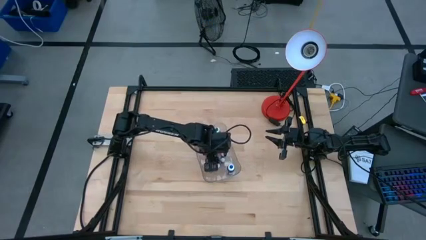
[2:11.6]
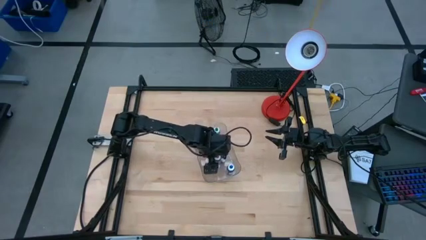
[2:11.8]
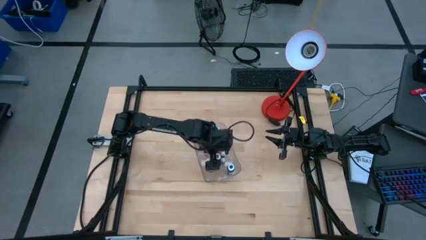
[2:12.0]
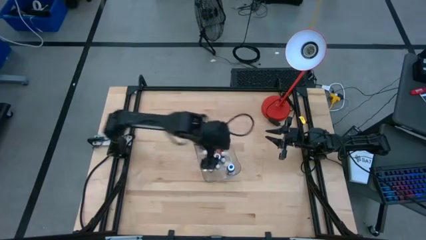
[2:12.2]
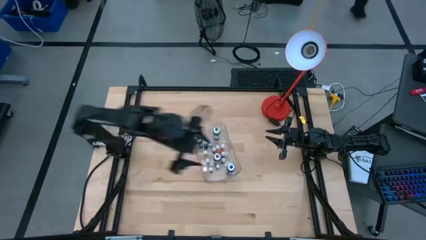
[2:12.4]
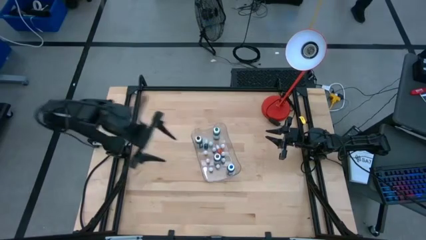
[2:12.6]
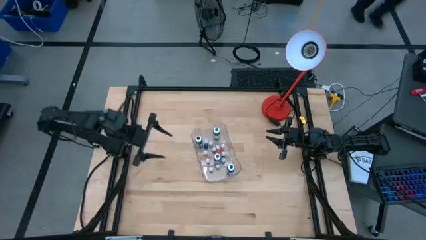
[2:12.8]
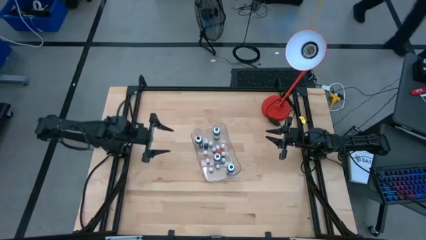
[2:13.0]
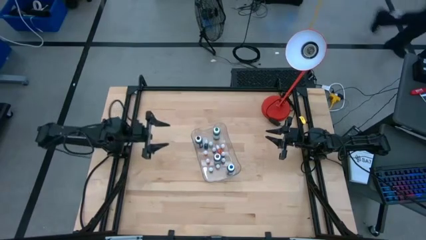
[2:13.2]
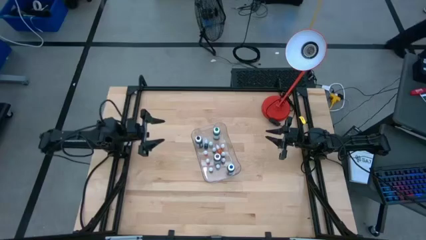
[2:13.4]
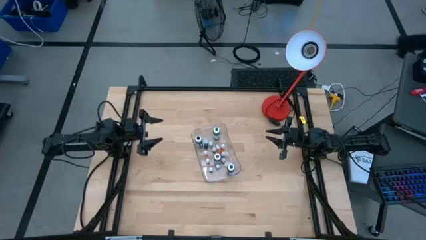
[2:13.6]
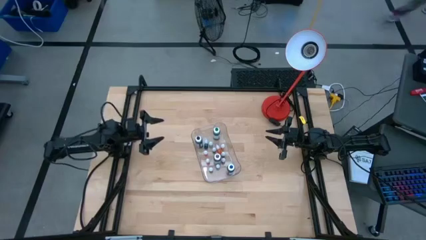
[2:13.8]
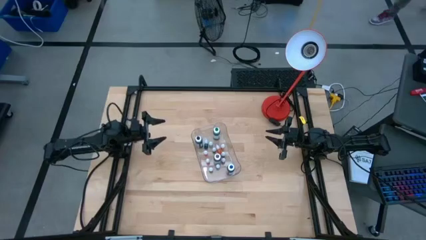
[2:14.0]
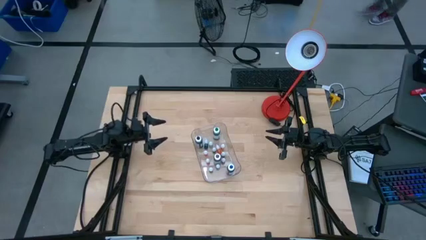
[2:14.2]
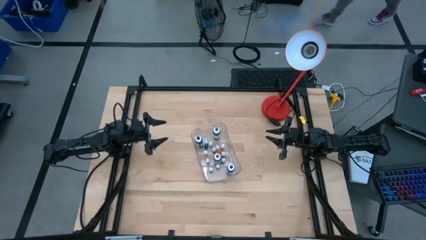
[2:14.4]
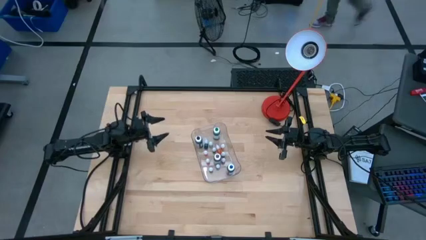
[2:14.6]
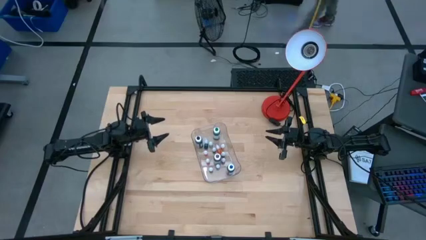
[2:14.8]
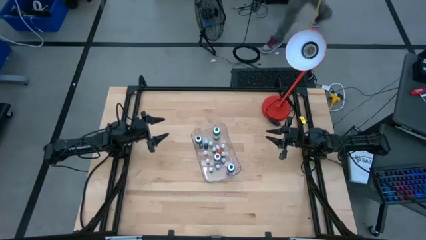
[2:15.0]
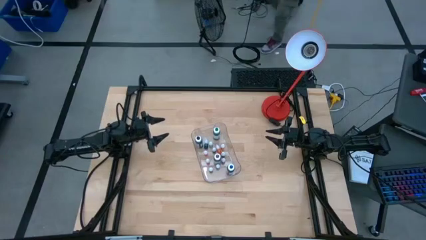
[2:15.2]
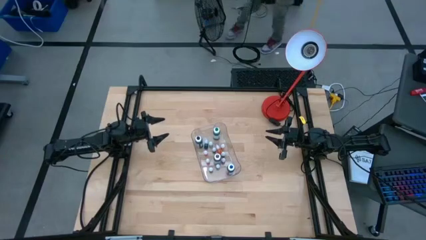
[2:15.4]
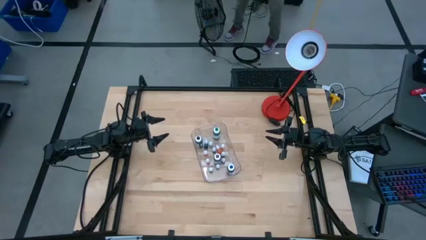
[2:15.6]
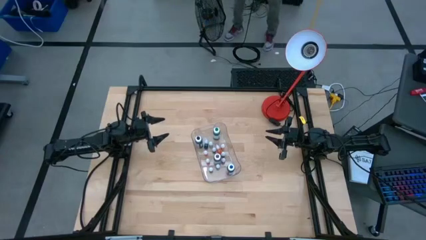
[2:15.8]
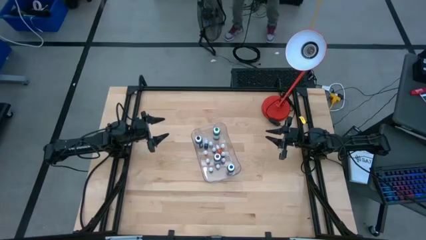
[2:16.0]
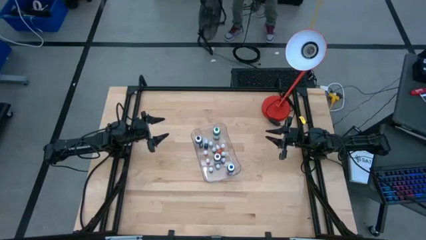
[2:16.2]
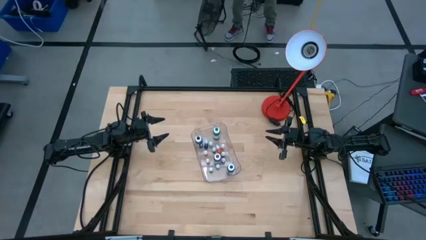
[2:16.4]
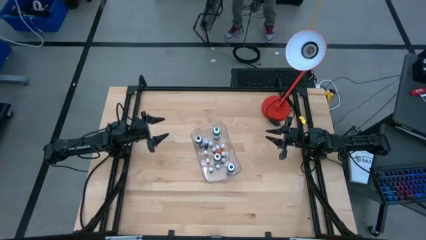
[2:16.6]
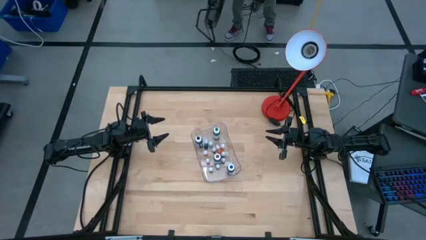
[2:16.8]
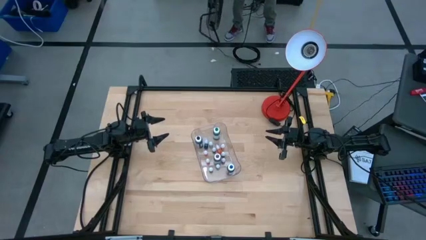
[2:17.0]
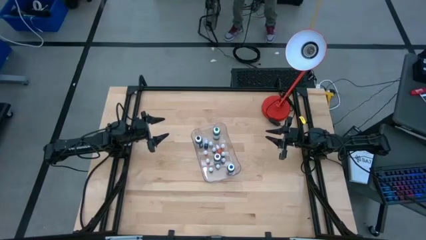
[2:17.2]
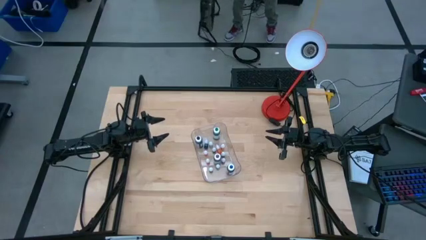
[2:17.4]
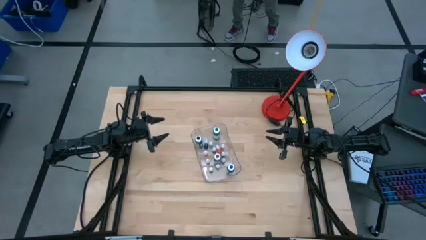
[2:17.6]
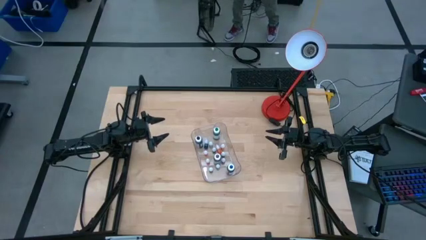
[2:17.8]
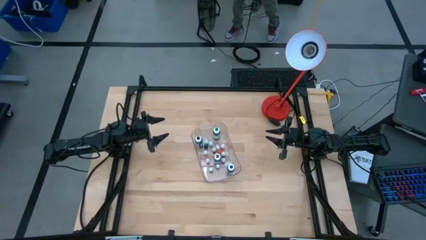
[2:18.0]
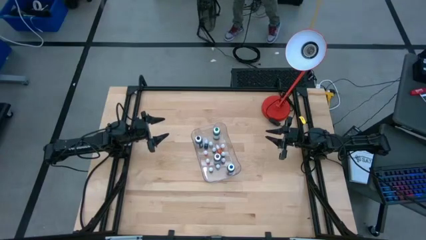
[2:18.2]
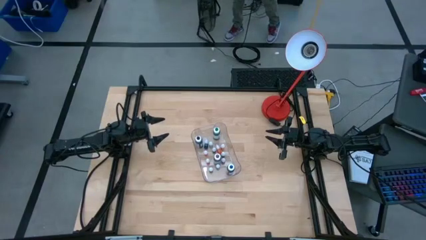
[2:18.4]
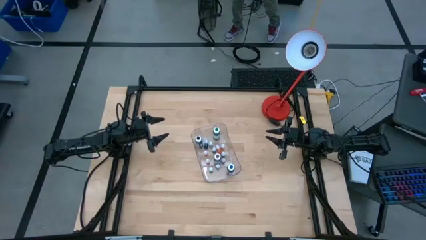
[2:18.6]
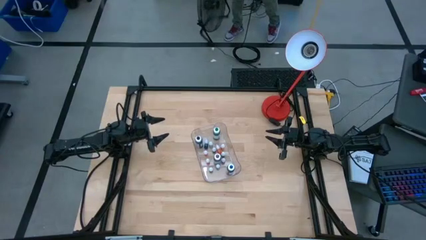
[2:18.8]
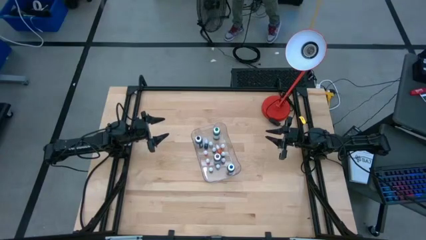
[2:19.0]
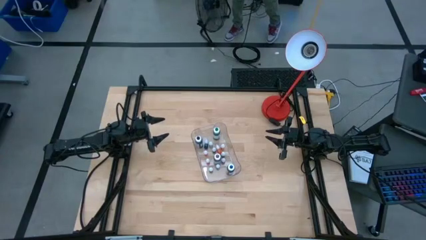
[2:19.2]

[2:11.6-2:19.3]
Task: Pick & Place food coloring
Return to Home Position

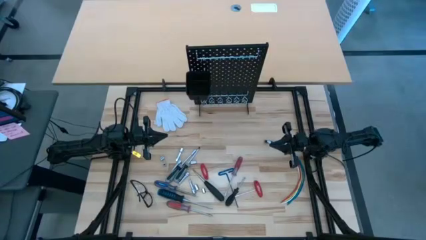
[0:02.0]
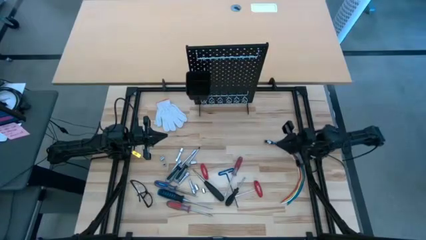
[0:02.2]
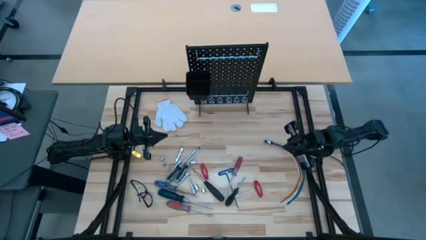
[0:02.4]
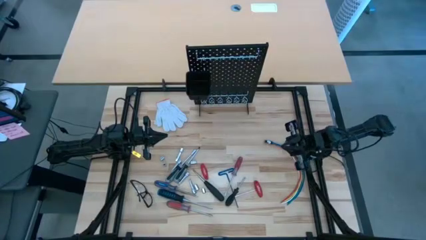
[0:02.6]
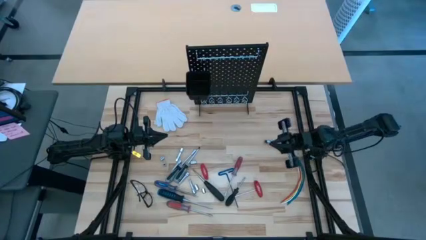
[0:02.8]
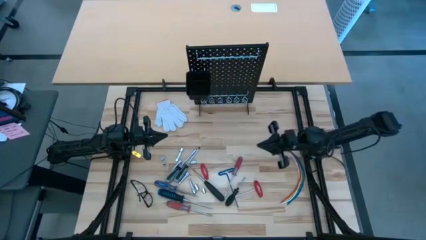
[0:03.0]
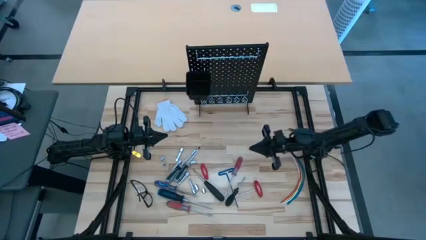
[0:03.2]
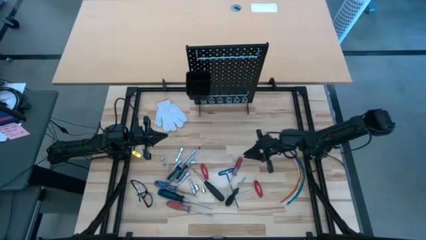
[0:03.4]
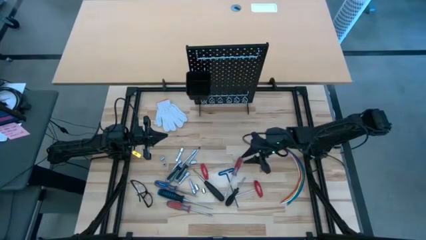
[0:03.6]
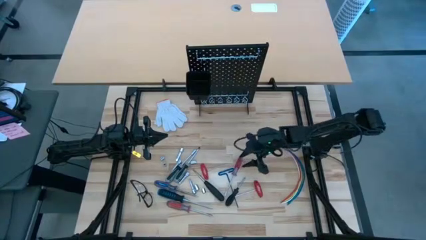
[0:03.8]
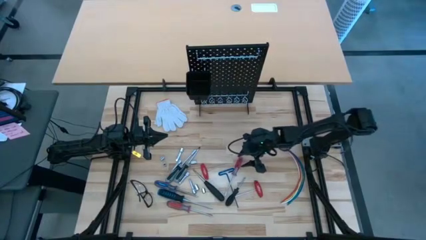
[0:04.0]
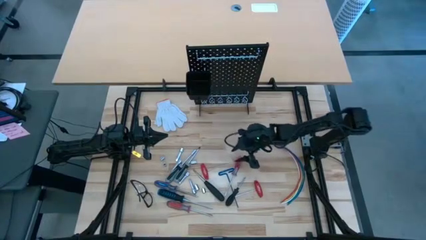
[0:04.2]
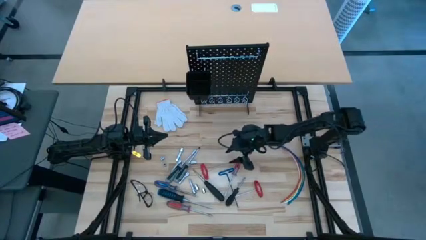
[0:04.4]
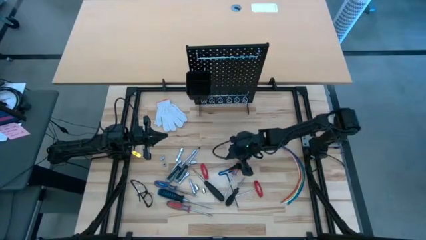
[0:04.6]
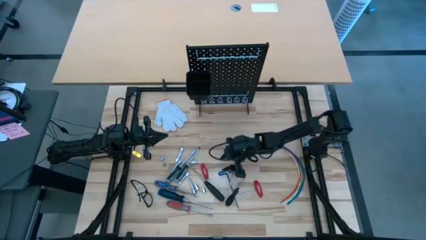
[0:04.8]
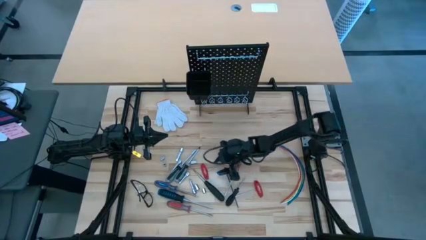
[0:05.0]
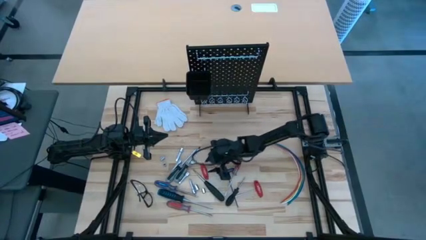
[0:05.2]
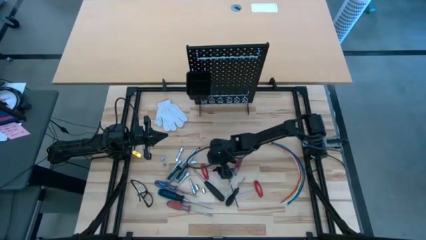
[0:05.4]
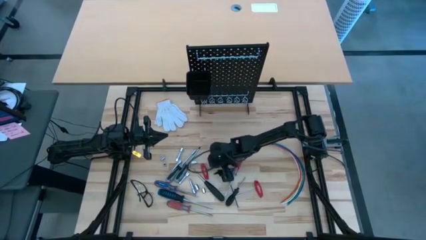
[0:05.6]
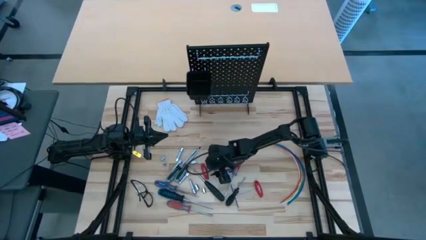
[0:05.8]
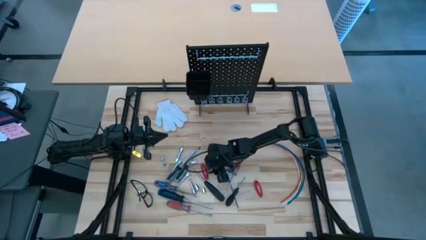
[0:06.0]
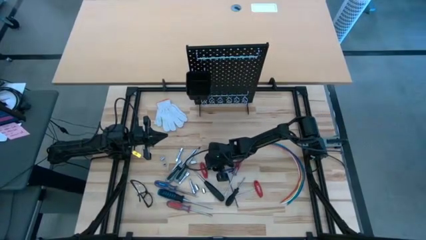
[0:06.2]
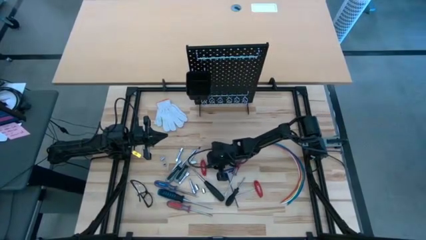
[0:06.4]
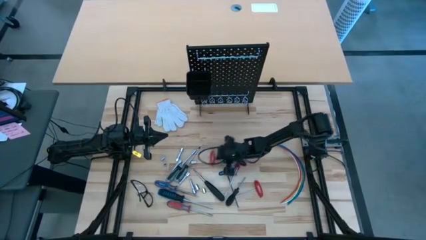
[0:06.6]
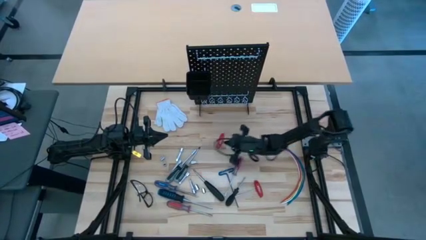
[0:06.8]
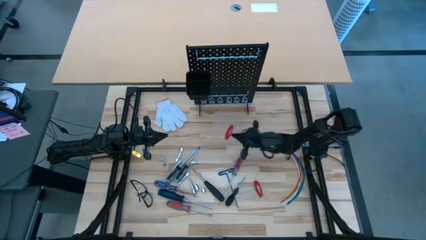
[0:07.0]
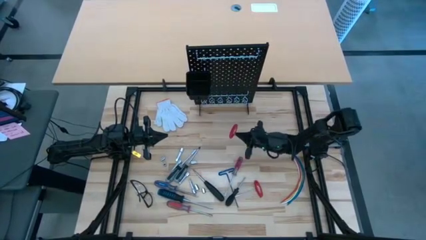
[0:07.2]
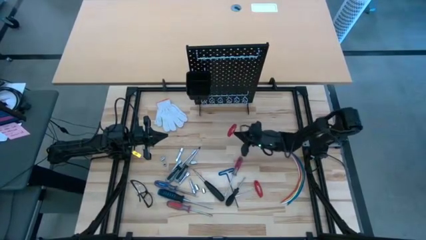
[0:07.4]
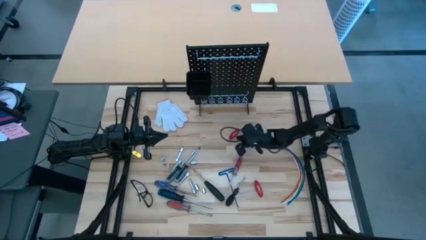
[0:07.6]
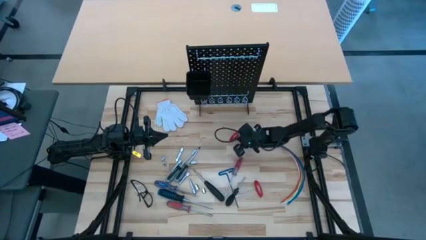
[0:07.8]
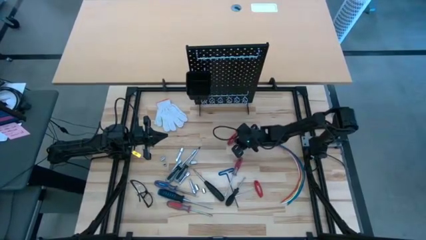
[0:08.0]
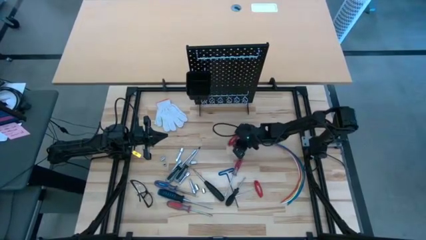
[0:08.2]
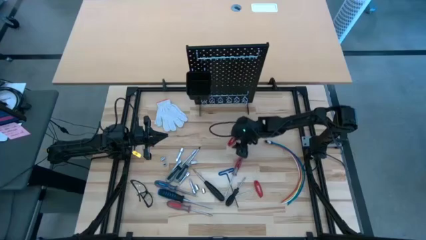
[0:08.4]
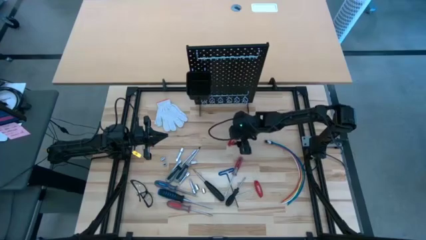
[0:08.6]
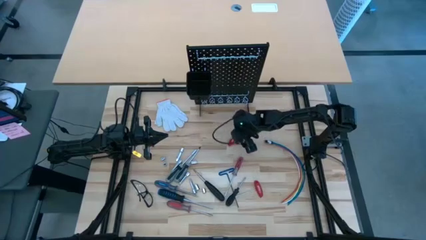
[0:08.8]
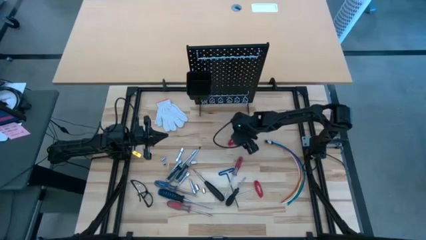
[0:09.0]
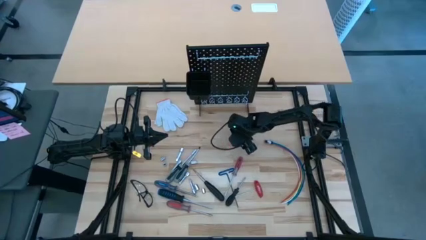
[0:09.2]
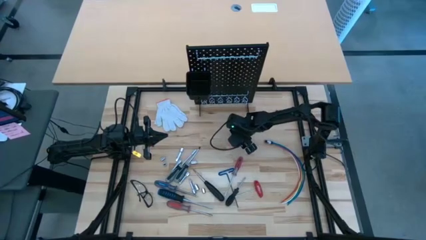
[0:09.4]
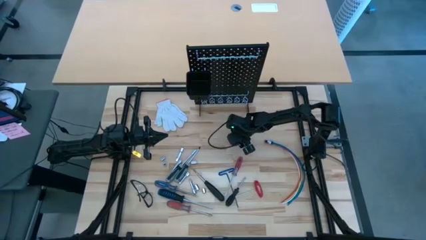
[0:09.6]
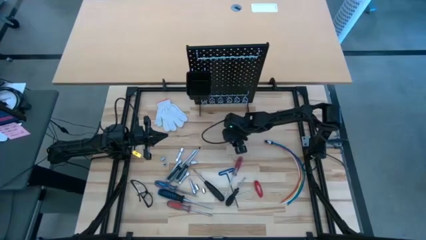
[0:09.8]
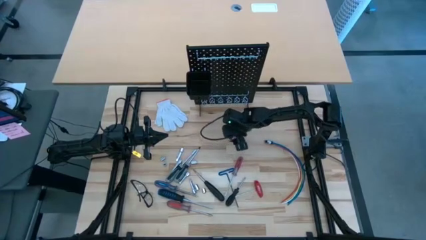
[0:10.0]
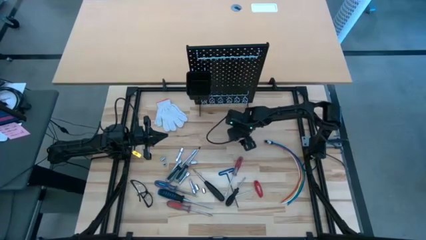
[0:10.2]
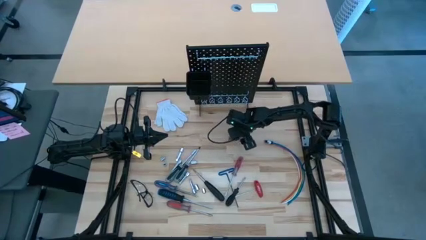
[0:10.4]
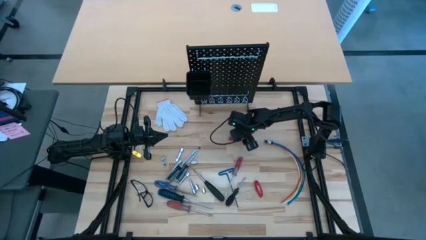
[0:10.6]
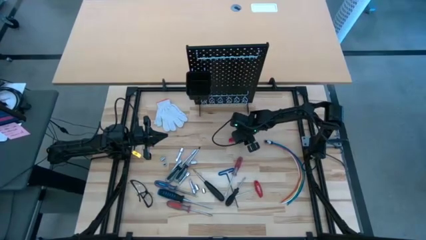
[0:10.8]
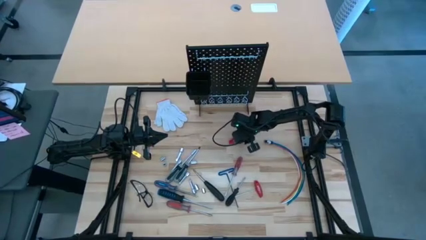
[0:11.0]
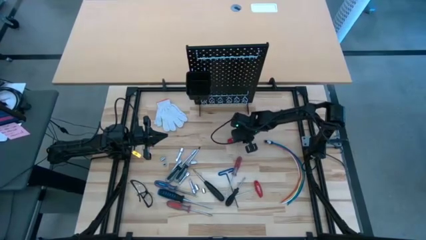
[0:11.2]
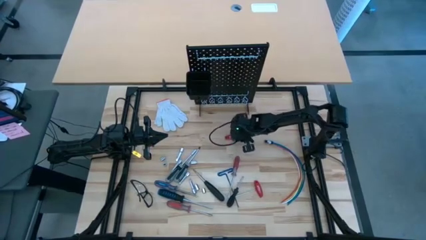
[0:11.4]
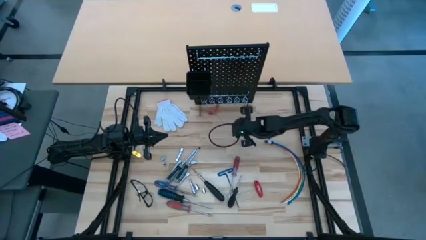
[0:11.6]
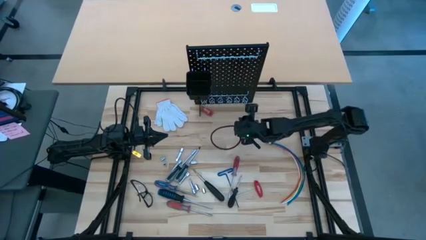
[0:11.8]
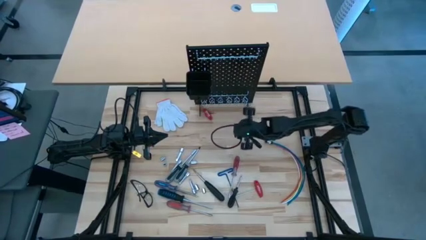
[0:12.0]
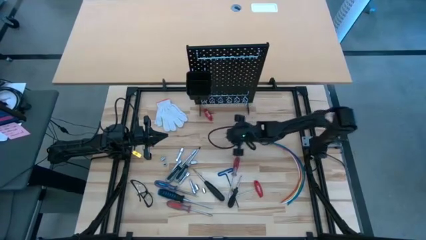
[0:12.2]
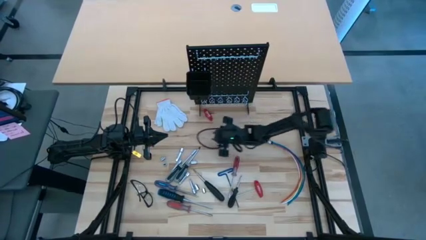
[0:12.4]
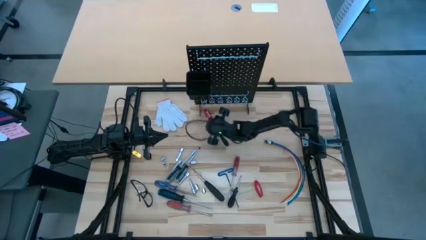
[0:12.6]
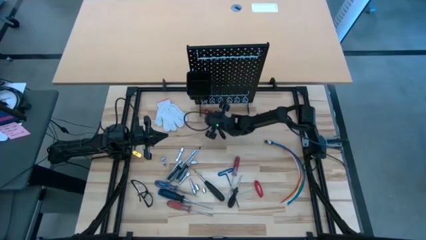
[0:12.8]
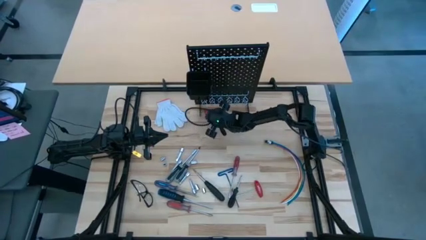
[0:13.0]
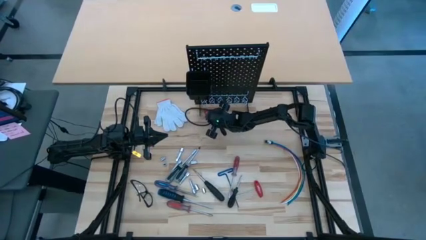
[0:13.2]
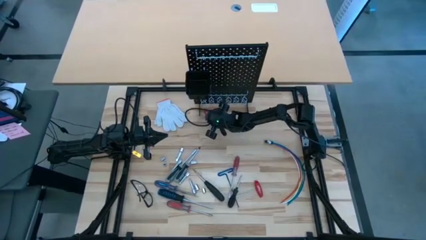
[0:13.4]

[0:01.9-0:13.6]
Task: Hang tools onto peg board
Hang the red allen wrench on the pegboard
